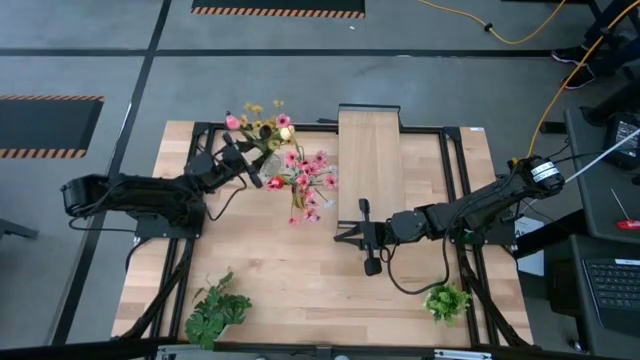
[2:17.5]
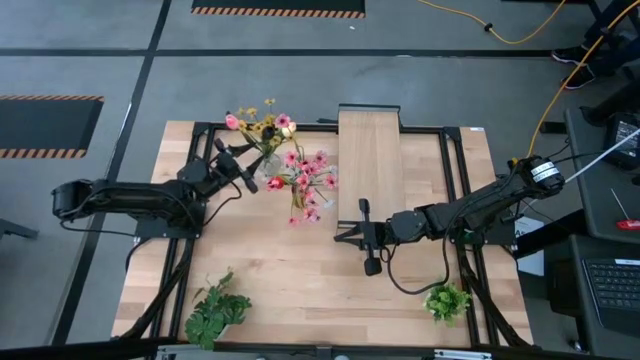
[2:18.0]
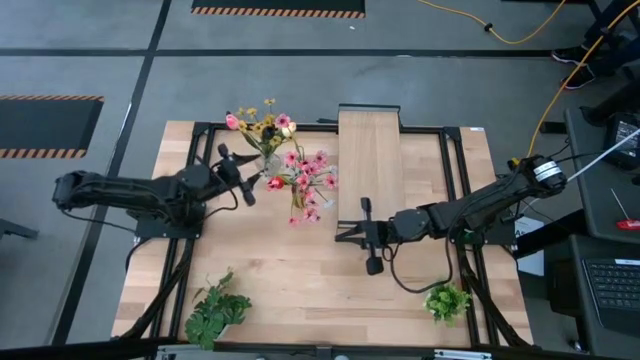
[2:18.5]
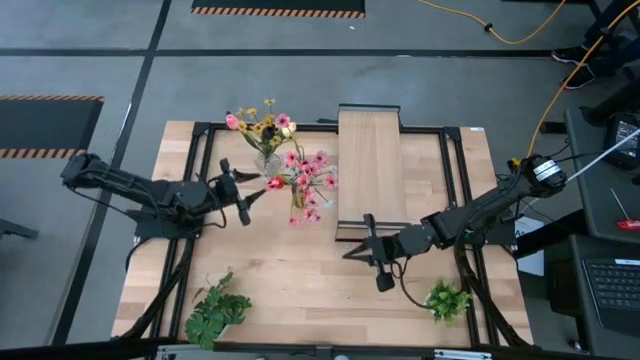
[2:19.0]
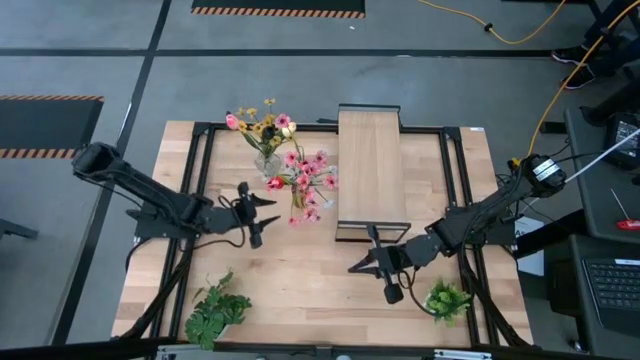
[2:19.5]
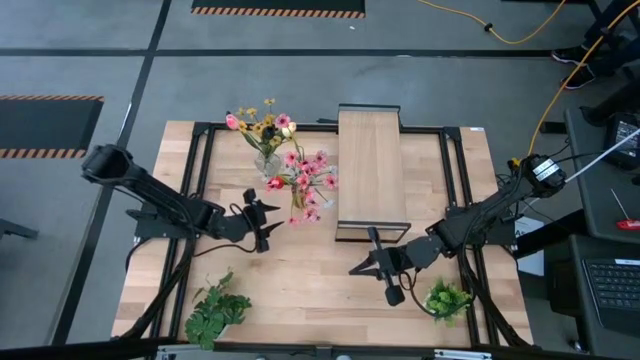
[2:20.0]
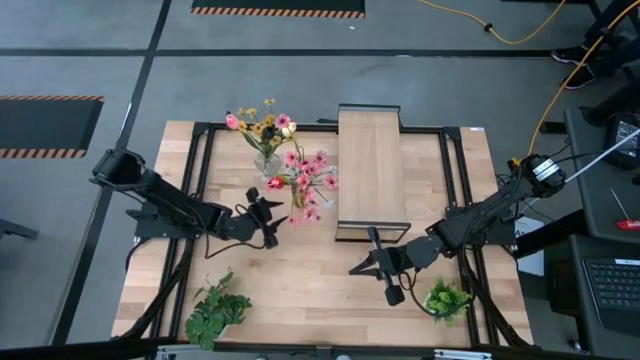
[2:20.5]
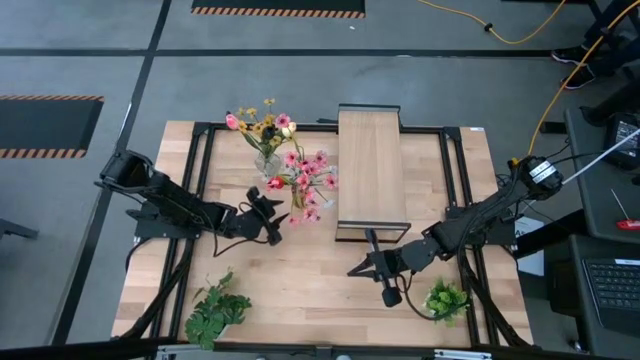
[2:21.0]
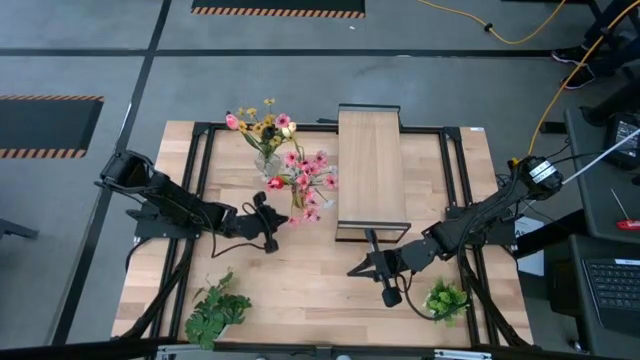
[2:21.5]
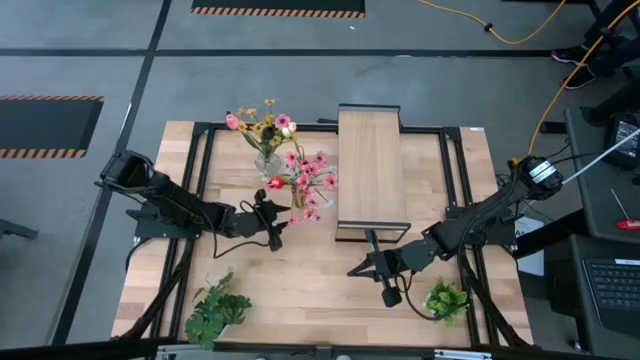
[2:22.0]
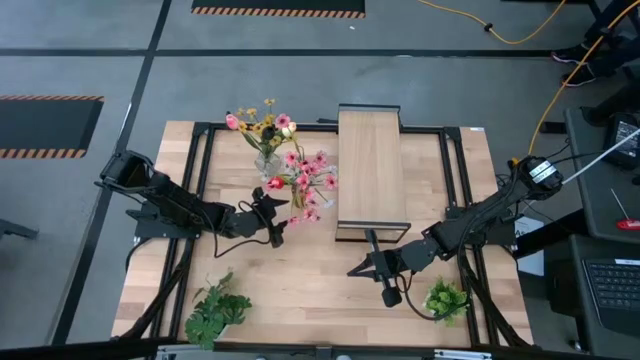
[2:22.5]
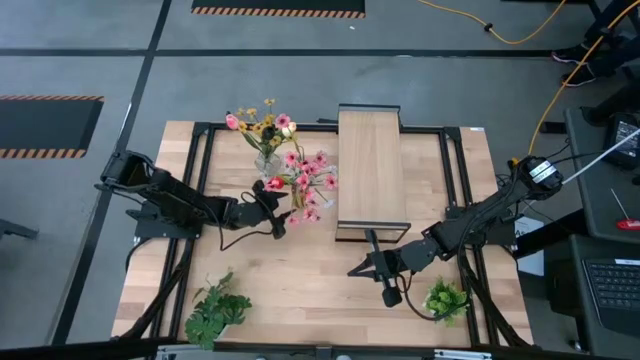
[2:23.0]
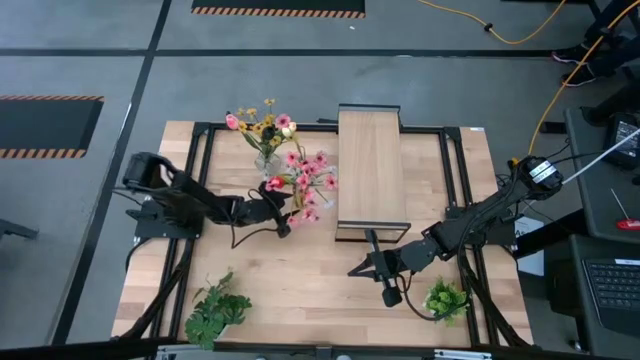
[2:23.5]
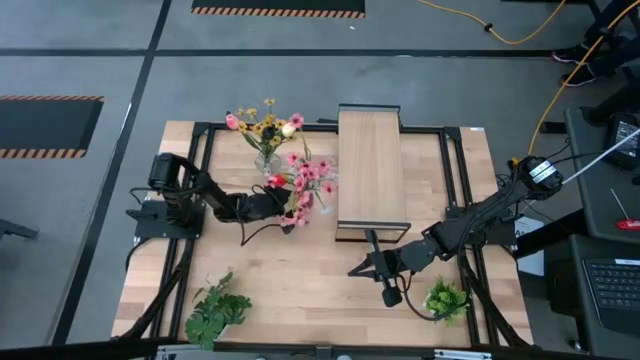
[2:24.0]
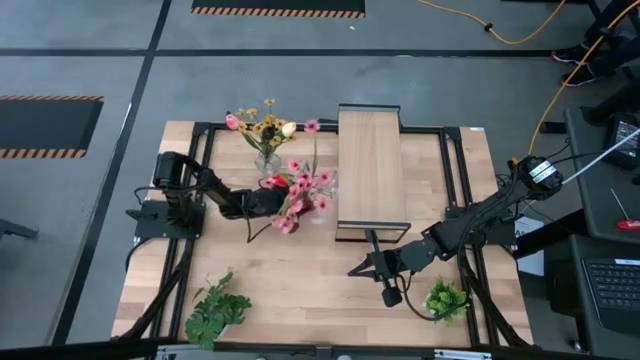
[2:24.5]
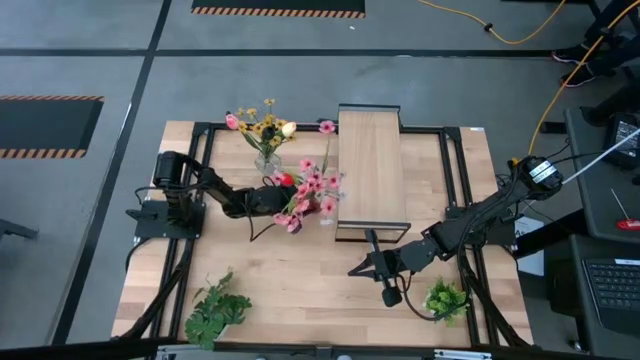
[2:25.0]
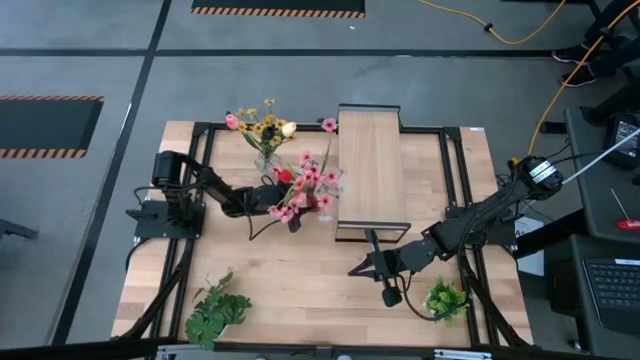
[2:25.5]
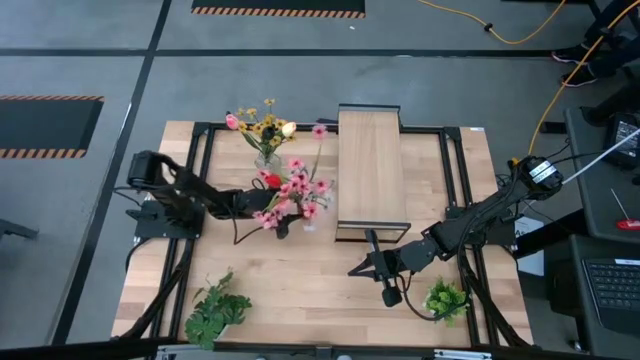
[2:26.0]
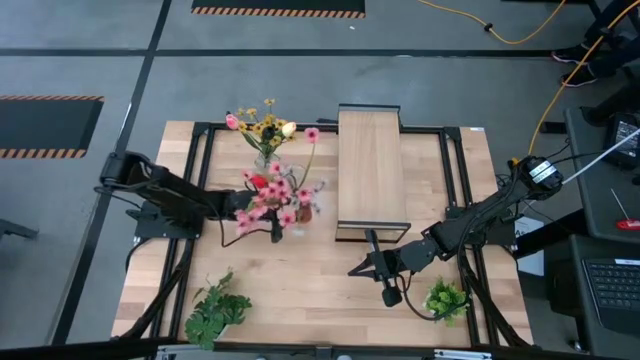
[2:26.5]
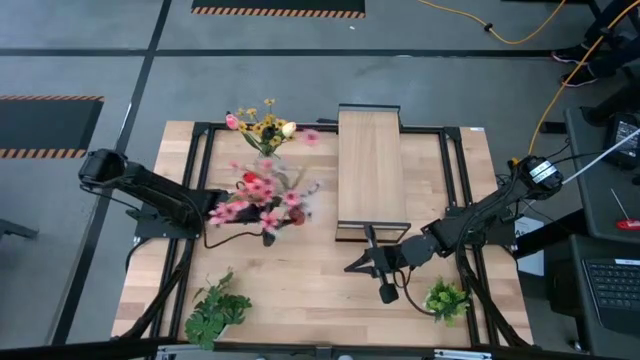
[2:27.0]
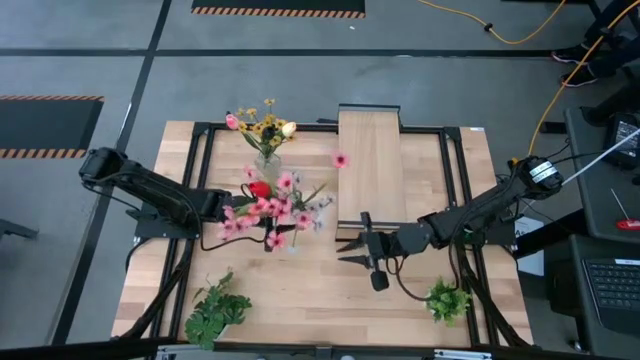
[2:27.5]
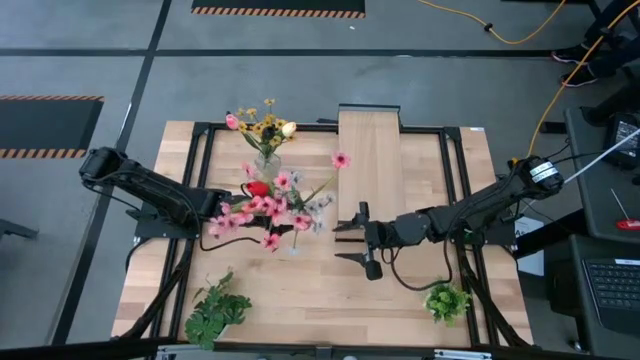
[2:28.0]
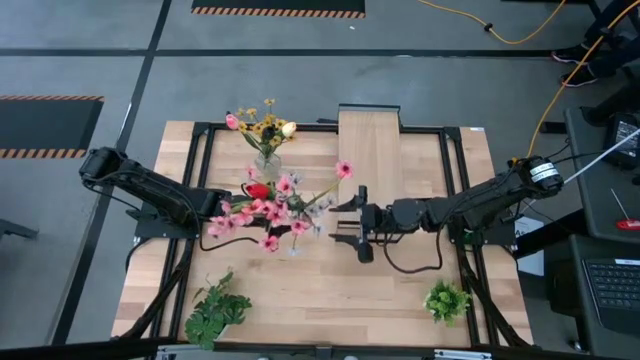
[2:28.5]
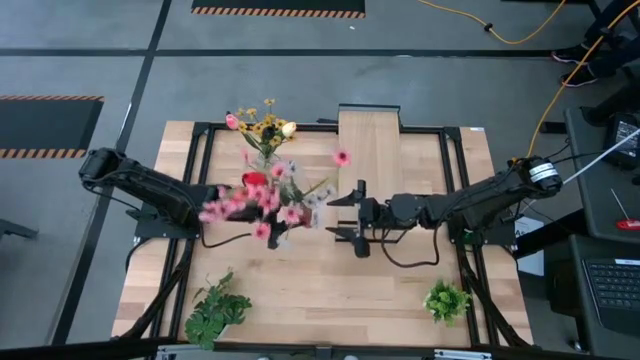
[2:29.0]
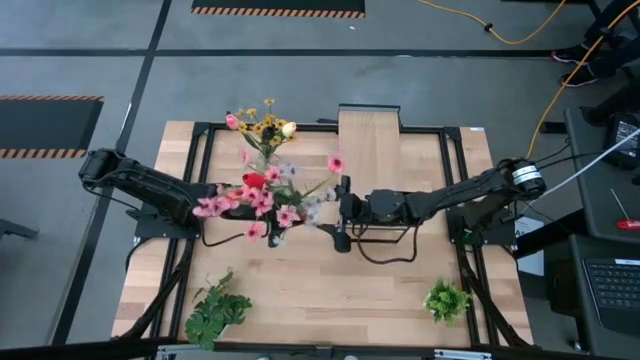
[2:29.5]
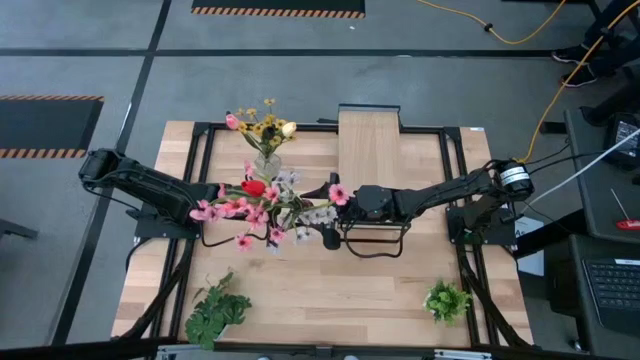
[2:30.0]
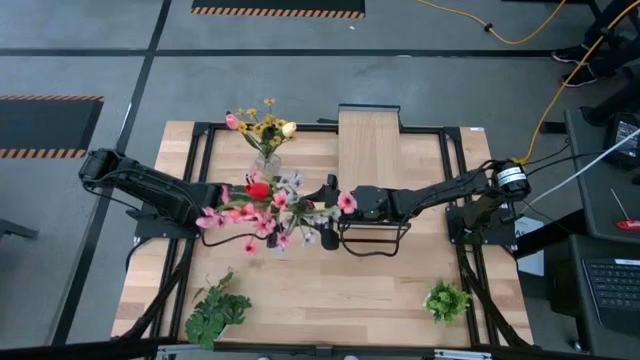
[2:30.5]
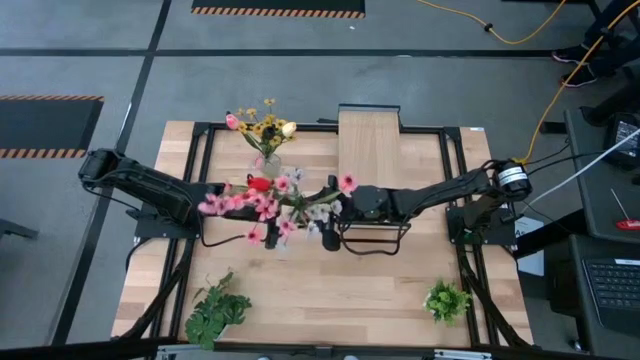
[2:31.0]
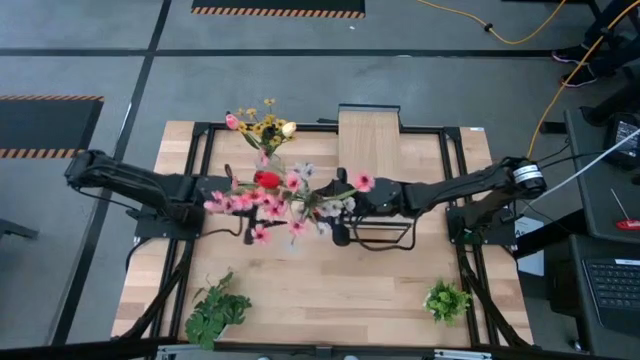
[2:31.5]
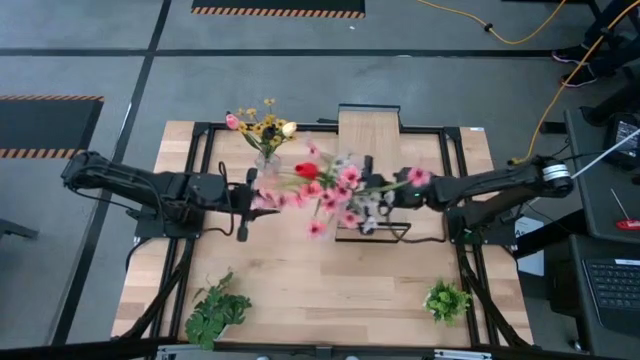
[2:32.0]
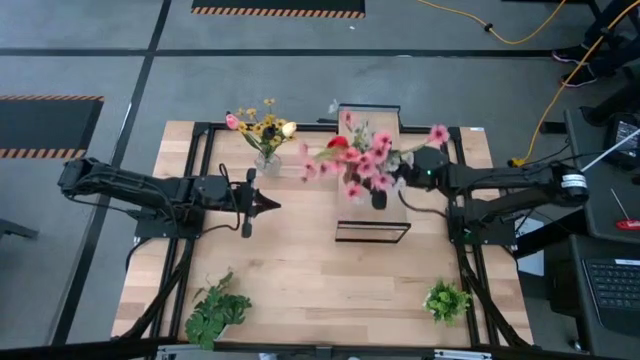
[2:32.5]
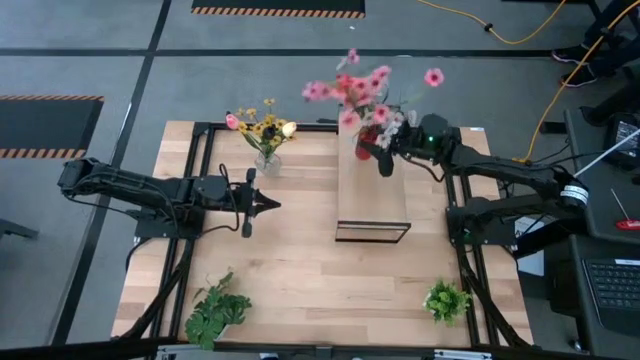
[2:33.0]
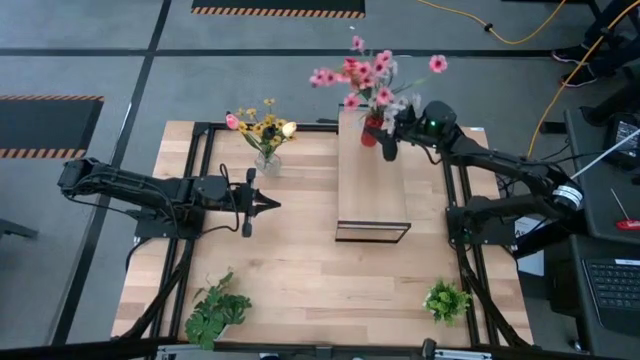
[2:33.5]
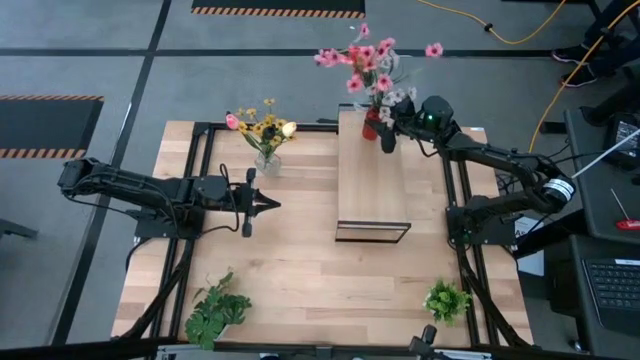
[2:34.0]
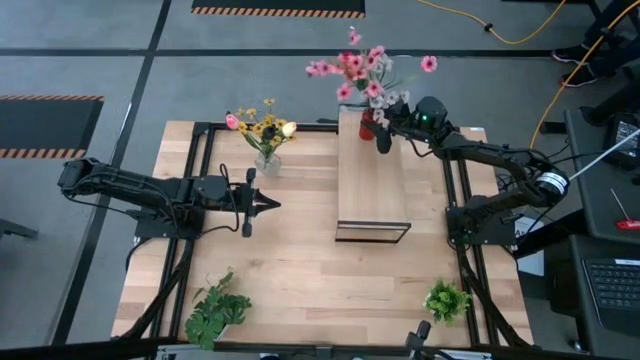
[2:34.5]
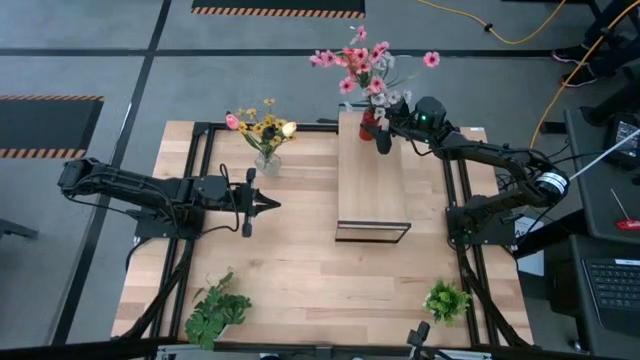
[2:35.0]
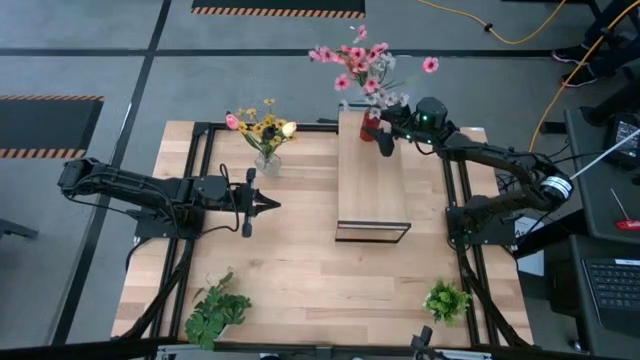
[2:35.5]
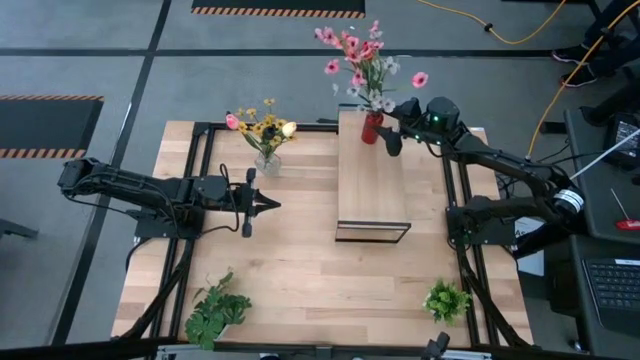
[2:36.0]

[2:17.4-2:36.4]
Task: Pick and place flowers into a vace then onto a shelf
Put the red vase on the shelf
